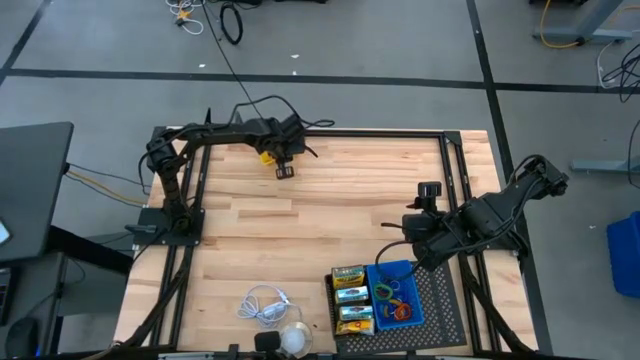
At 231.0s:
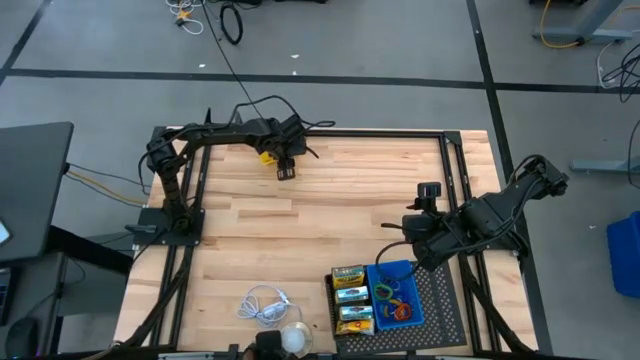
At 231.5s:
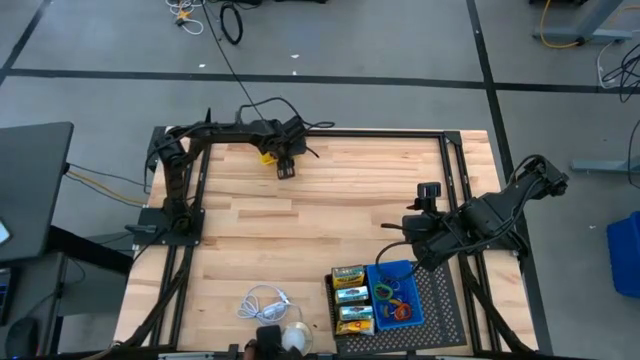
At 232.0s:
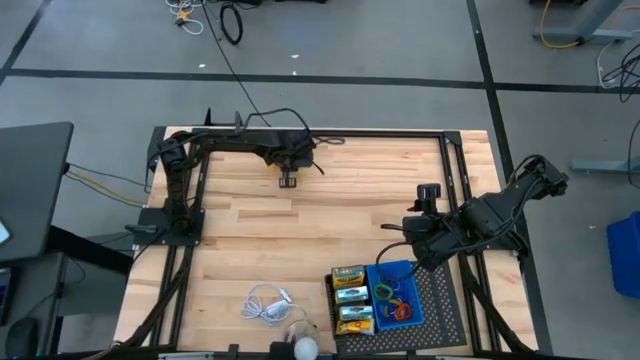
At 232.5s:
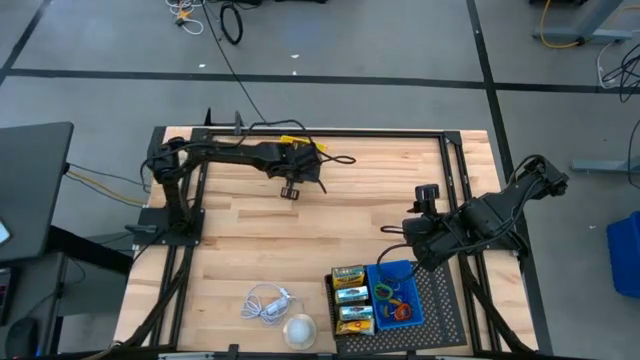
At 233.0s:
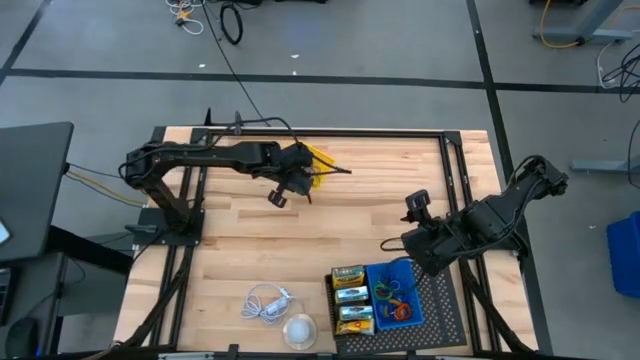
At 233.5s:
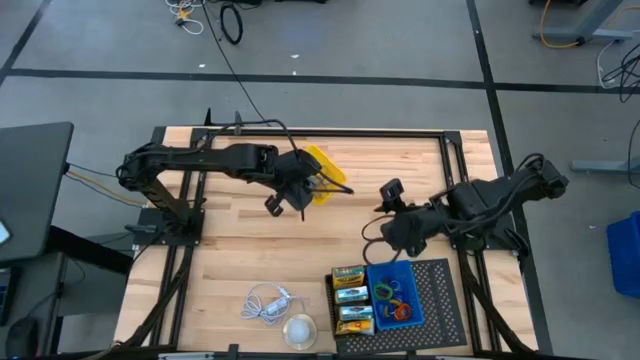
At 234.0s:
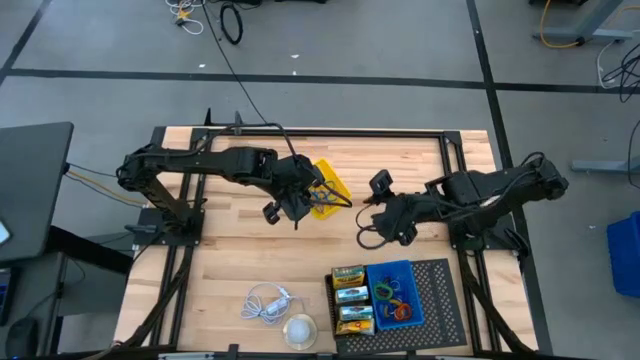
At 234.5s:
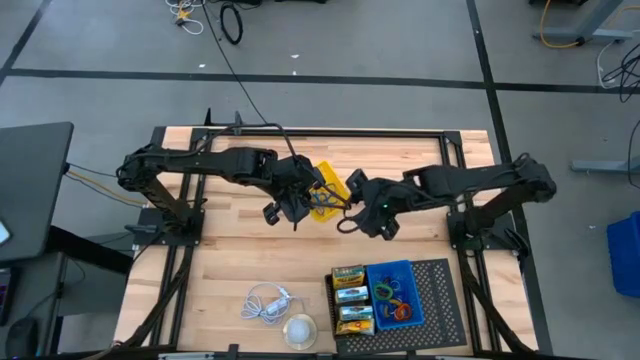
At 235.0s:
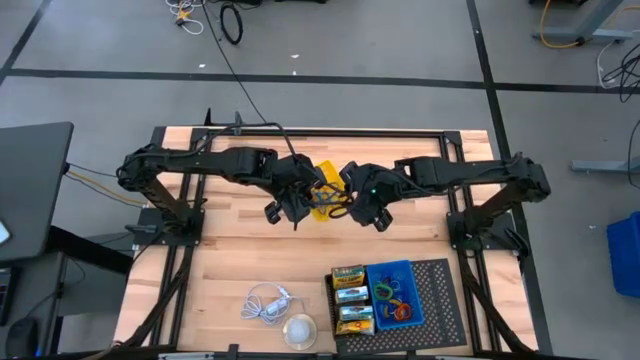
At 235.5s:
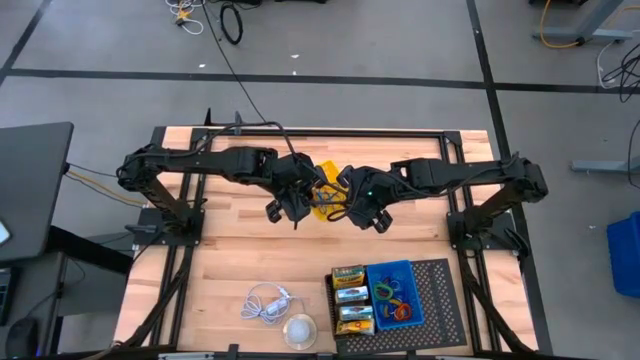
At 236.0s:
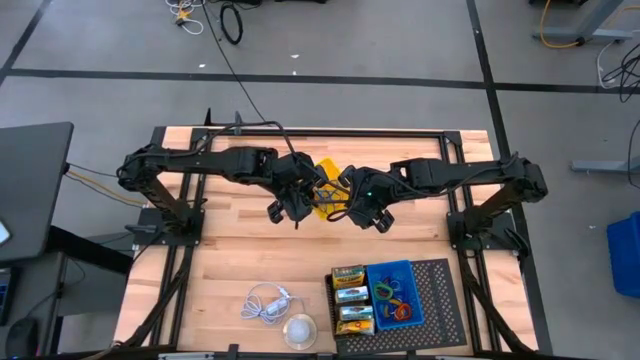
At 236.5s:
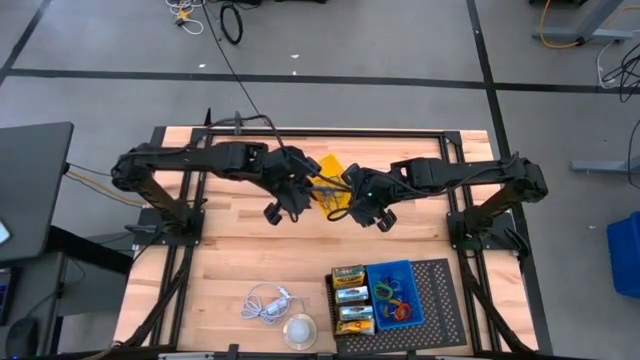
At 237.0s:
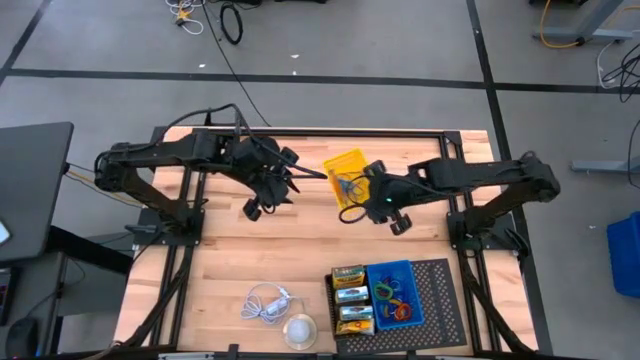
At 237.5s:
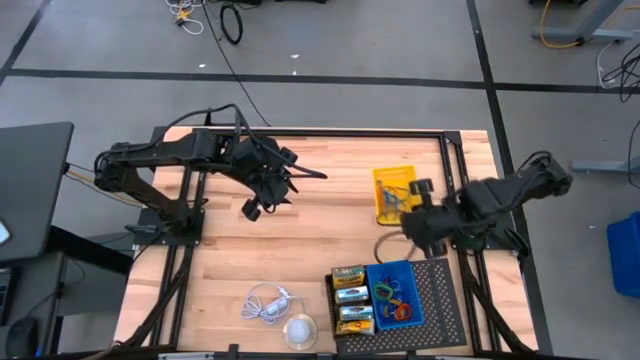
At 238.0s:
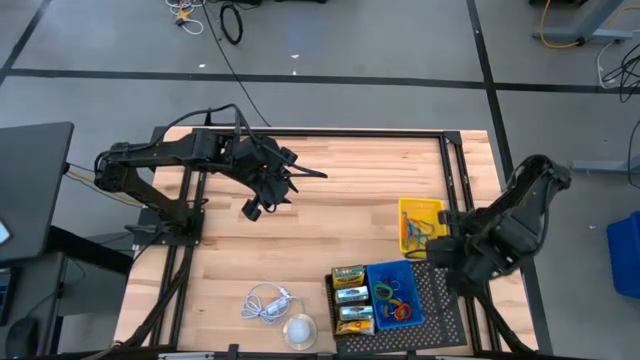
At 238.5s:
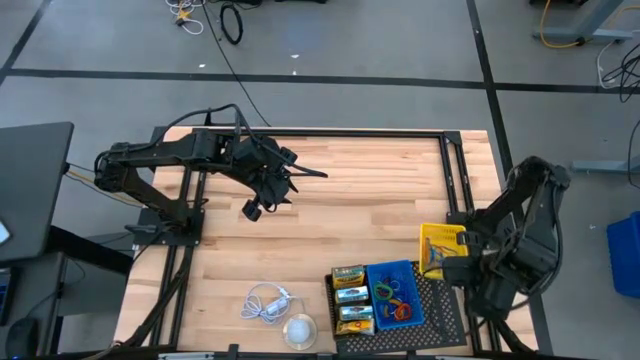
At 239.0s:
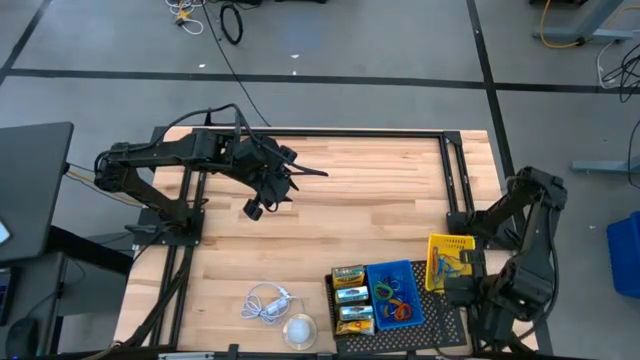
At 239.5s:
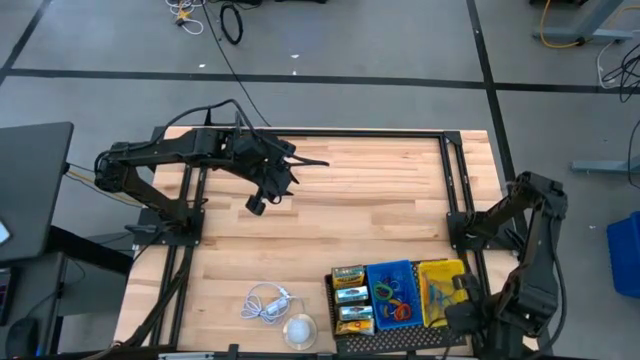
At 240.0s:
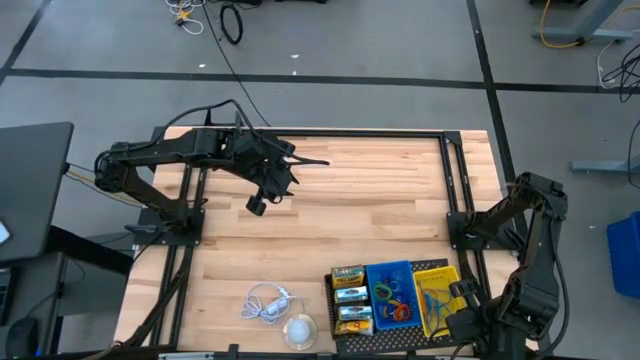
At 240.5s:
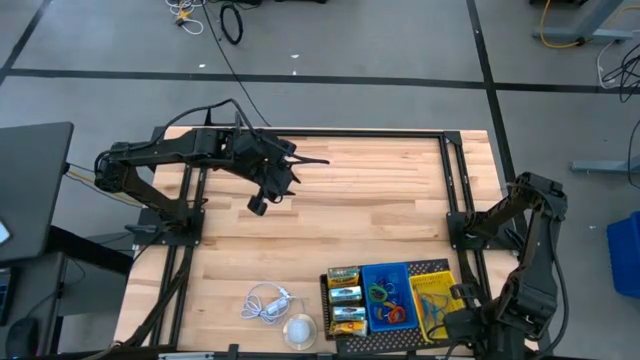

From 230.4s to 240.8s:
Task: Pick & Place Office Desk Supplies
Put the yellow basket filled with rubber bands on the shelf

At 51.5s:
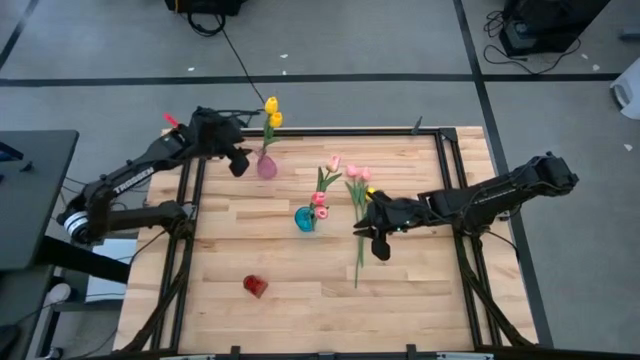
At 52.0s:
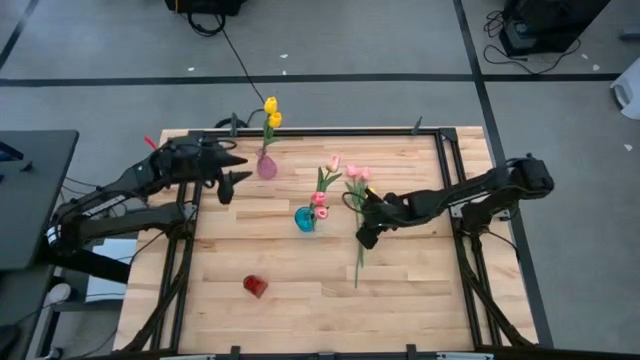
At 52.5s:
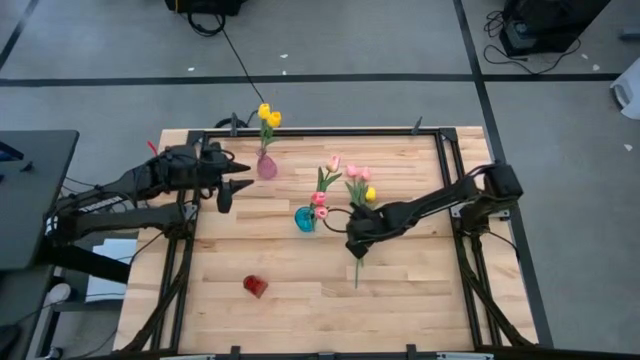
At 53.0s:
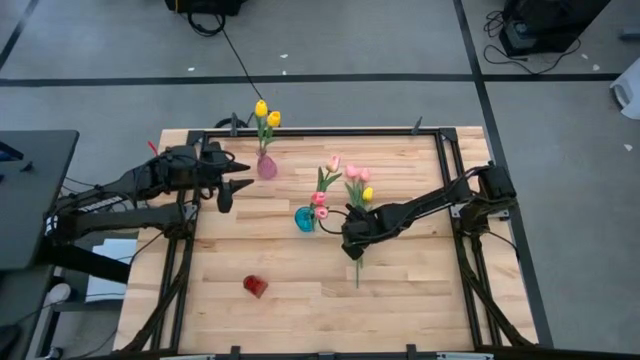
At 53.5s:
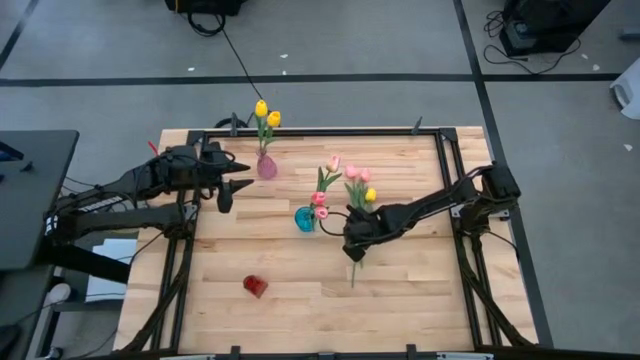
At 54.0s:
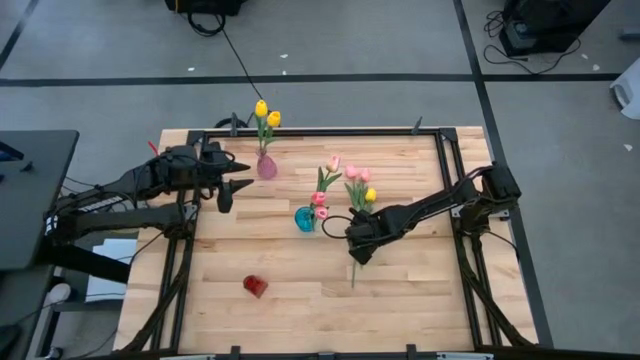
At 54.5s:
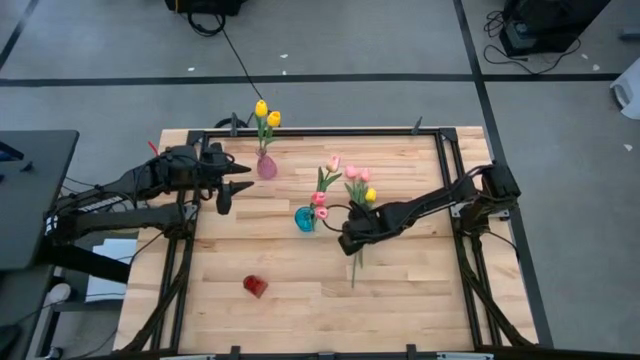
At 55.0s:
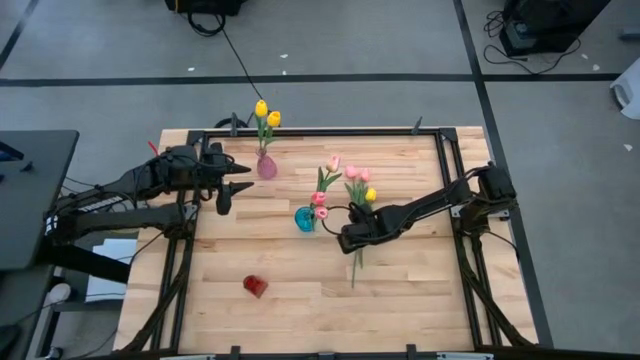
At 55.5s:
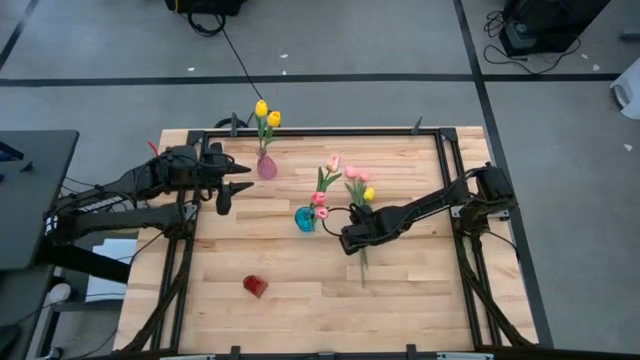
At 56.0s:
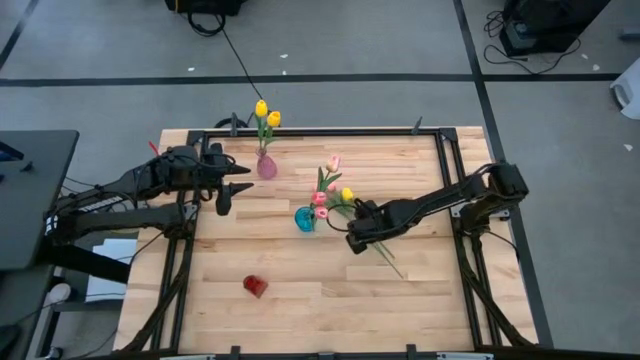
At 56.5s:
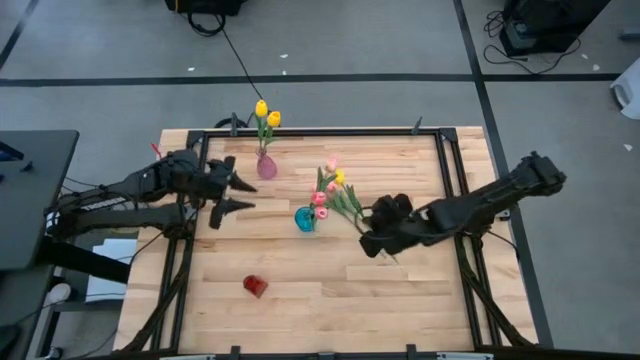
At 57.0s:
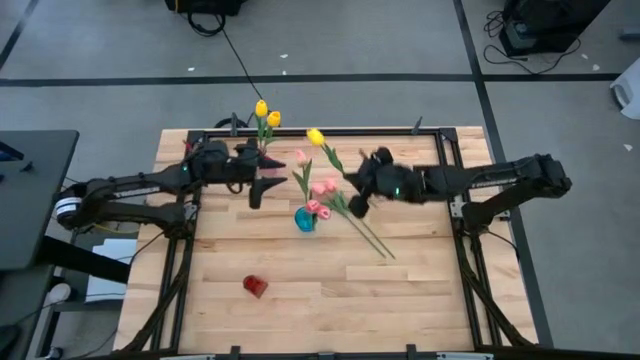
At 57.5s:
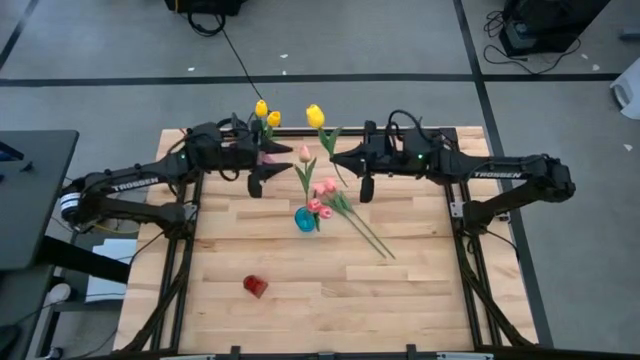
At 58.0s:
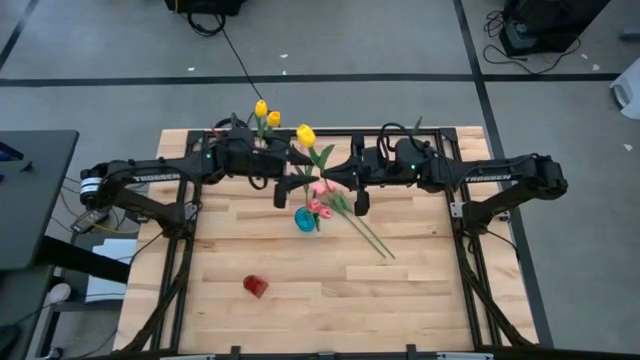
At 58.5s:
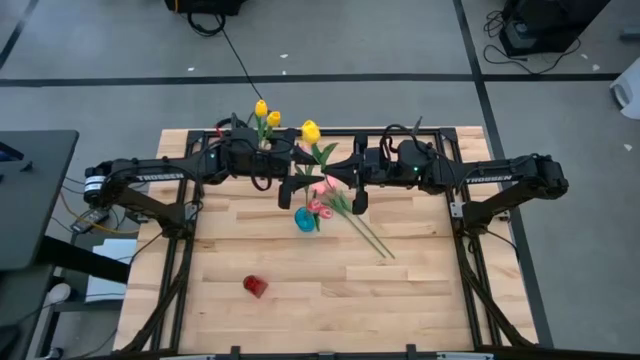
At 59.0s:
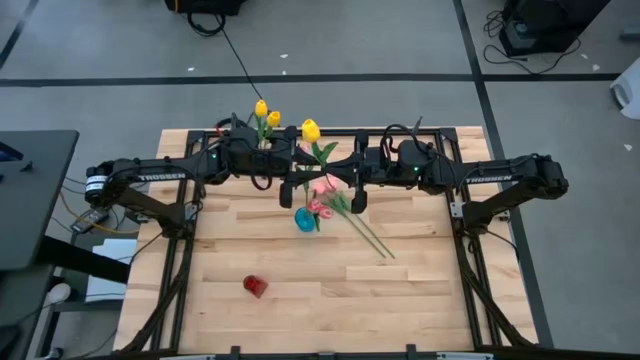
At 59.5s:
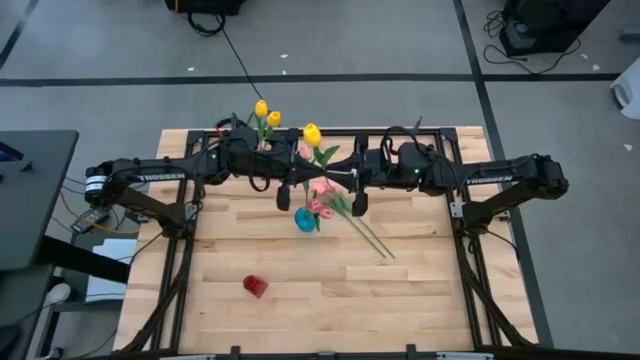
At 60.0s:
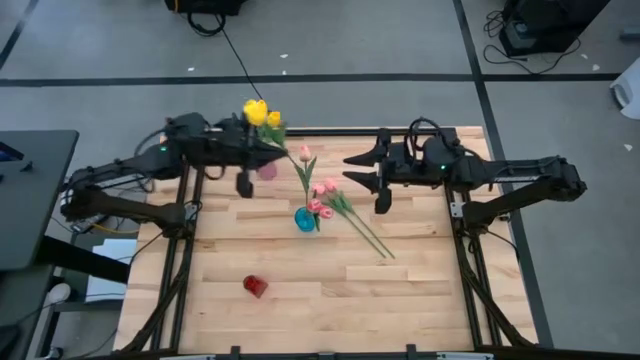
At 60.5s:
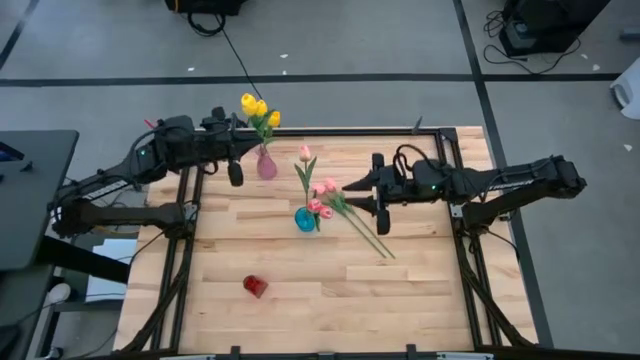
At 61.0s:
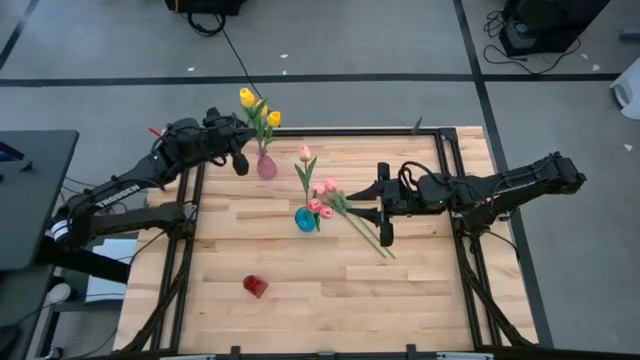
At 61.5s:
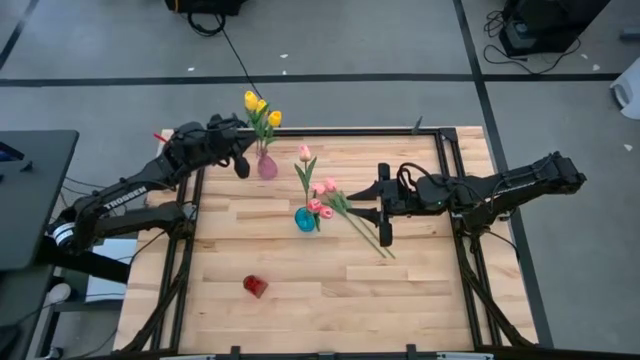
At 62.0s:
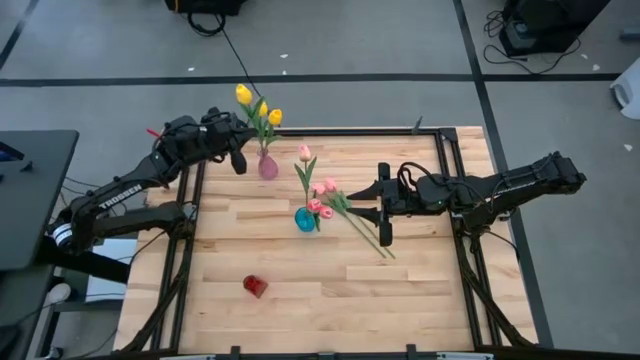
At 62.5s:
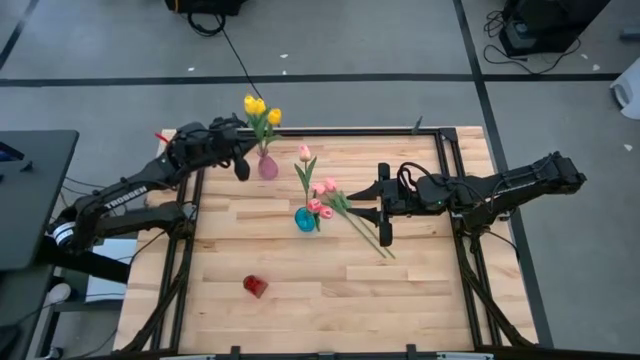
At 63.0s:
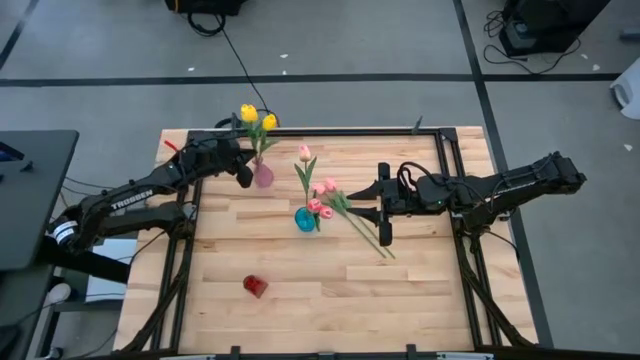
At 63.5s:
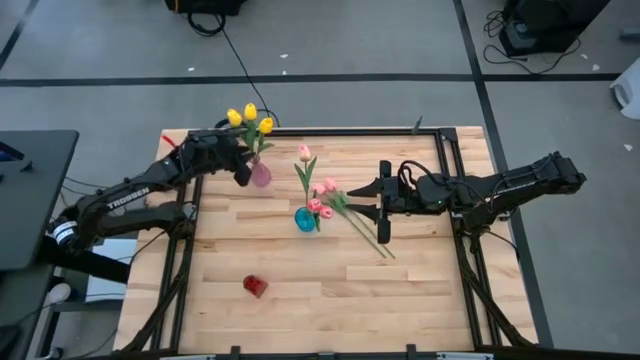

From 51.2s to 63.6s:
Task: Sort flowers into vase by color
Put the yellow flower into the purple flower vase
